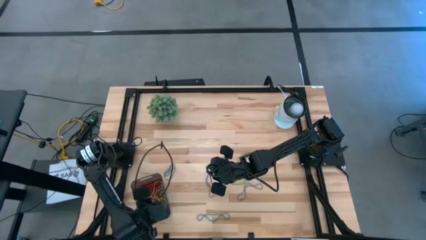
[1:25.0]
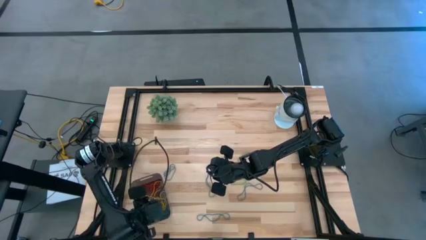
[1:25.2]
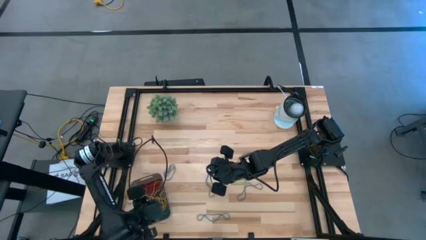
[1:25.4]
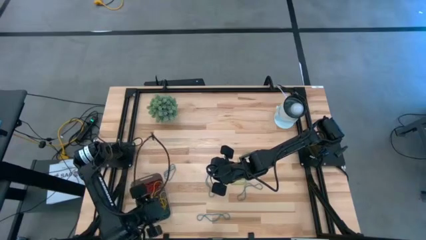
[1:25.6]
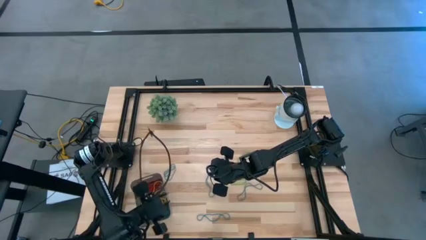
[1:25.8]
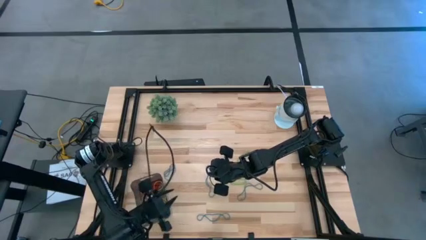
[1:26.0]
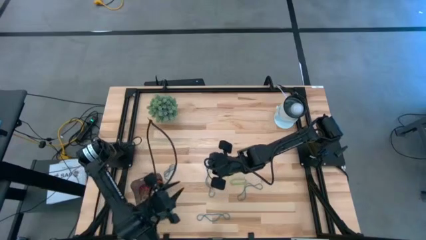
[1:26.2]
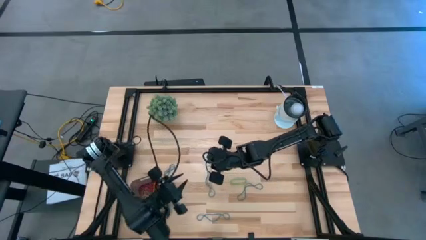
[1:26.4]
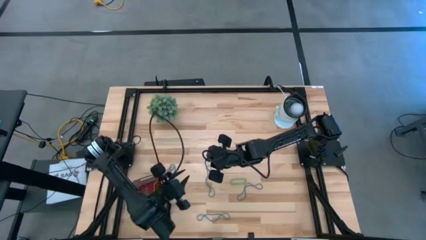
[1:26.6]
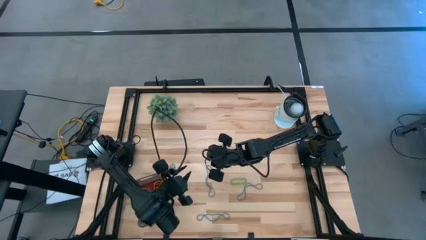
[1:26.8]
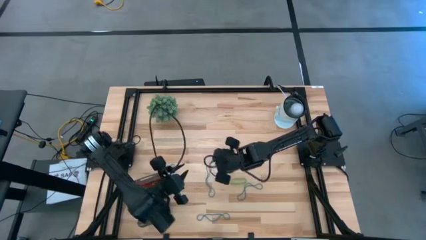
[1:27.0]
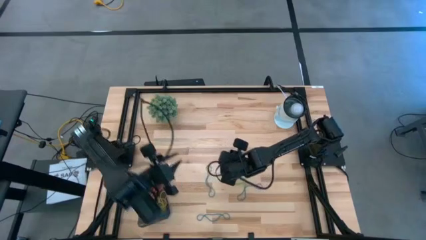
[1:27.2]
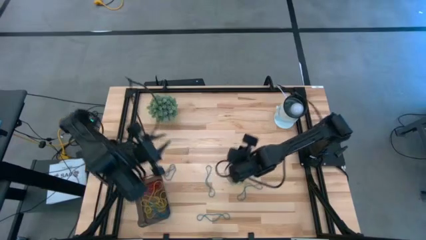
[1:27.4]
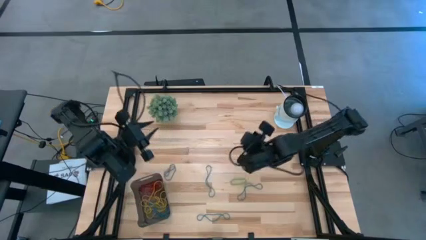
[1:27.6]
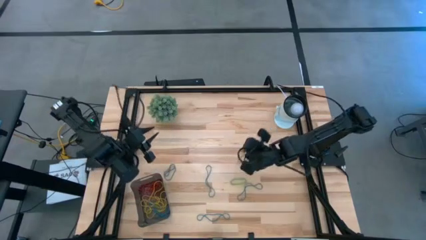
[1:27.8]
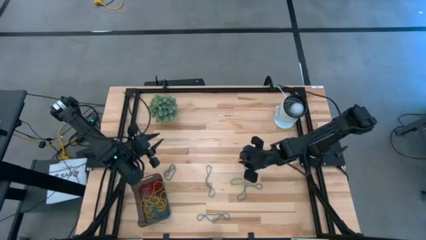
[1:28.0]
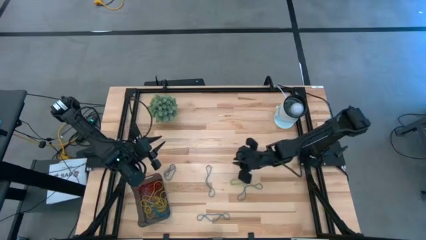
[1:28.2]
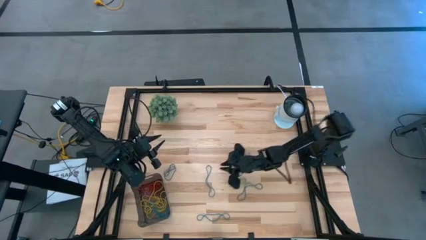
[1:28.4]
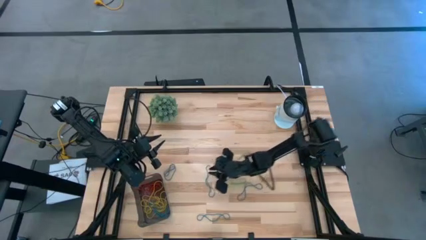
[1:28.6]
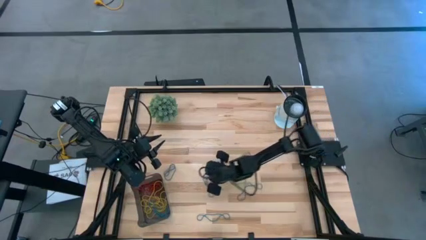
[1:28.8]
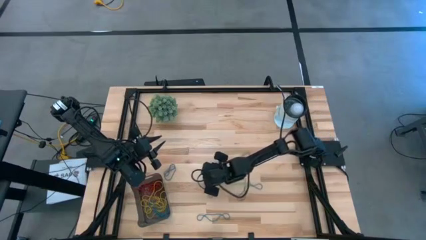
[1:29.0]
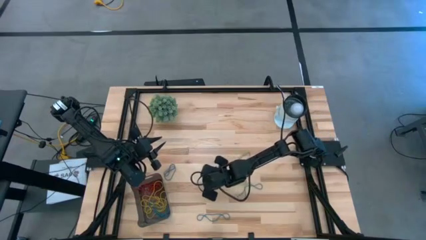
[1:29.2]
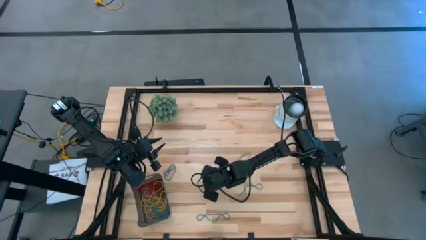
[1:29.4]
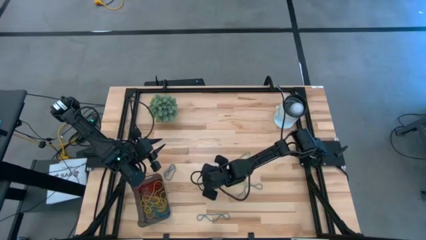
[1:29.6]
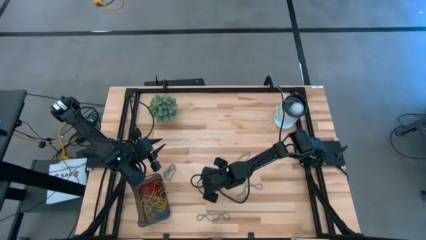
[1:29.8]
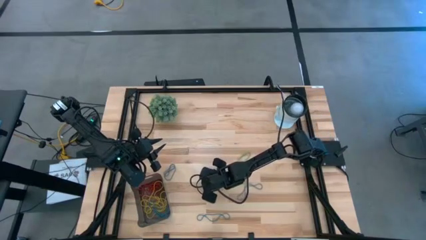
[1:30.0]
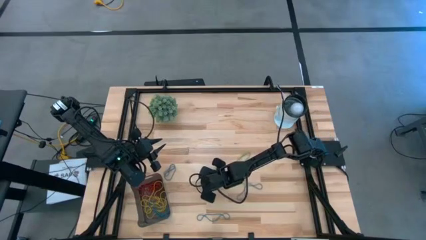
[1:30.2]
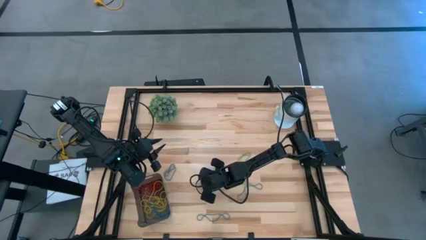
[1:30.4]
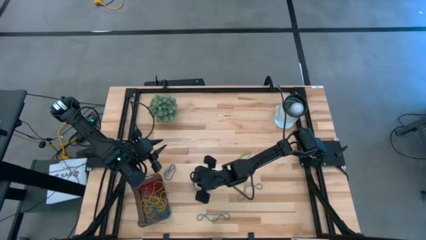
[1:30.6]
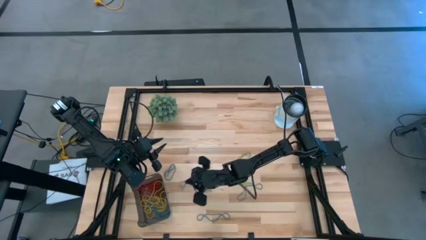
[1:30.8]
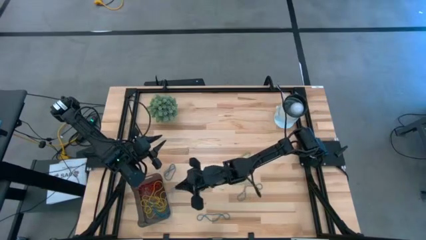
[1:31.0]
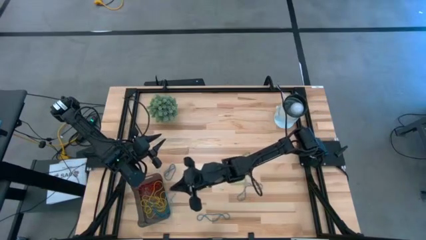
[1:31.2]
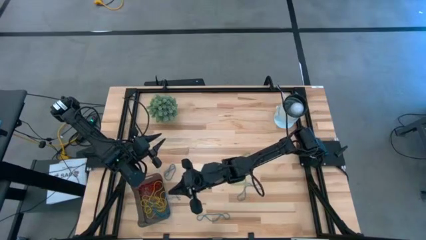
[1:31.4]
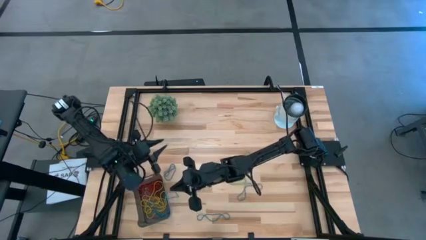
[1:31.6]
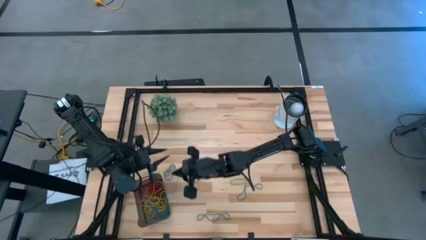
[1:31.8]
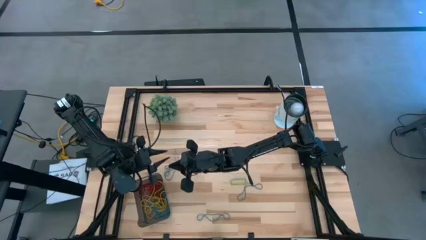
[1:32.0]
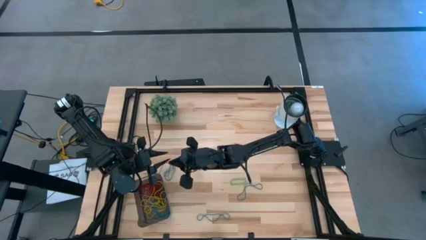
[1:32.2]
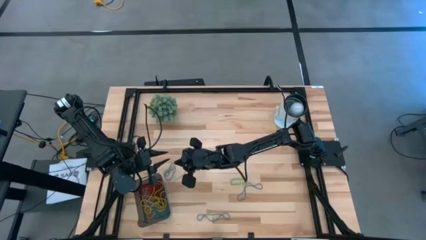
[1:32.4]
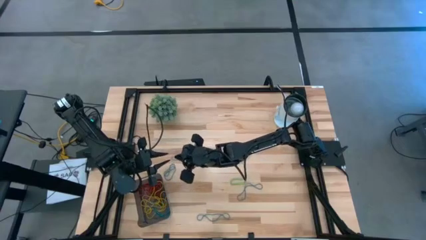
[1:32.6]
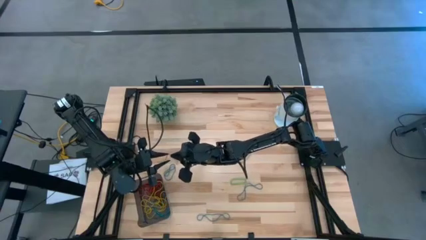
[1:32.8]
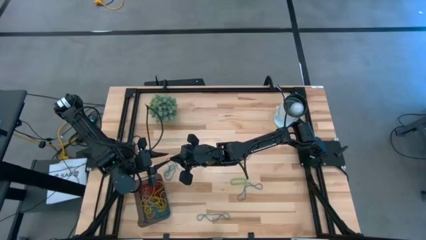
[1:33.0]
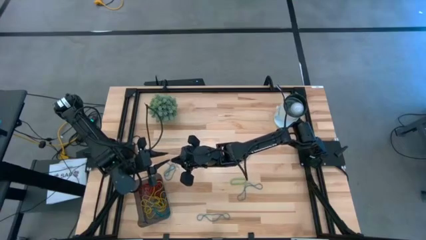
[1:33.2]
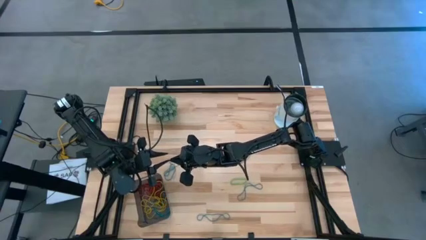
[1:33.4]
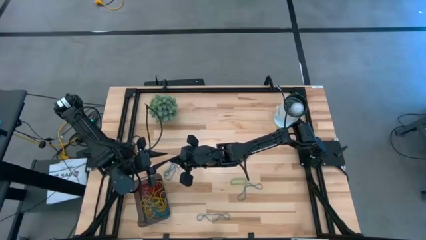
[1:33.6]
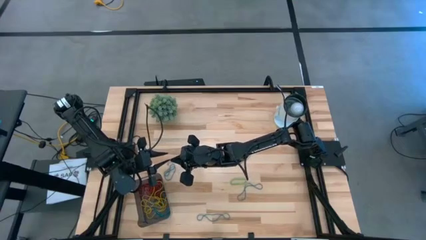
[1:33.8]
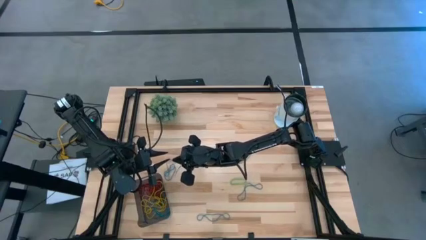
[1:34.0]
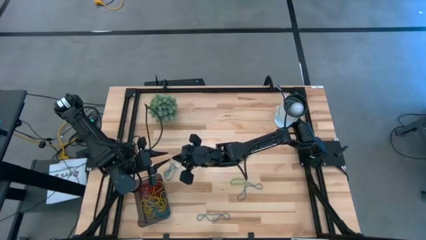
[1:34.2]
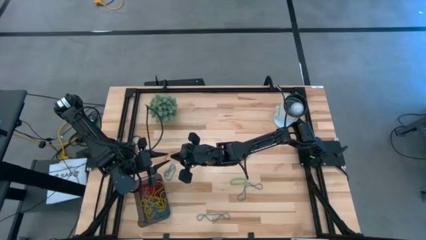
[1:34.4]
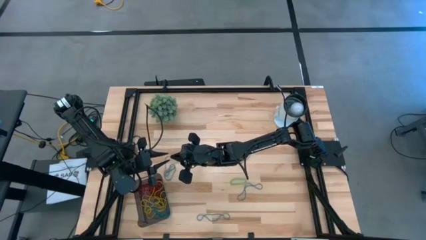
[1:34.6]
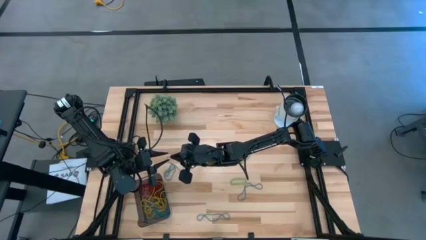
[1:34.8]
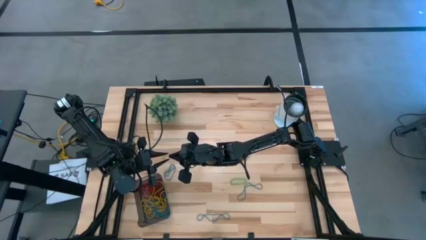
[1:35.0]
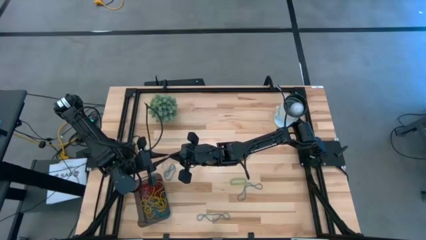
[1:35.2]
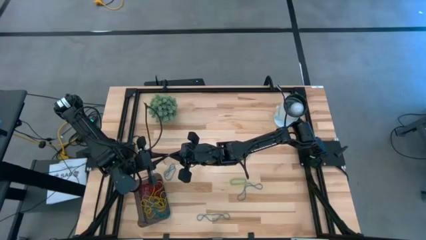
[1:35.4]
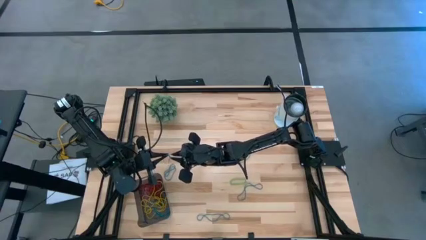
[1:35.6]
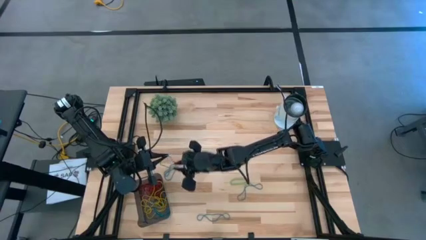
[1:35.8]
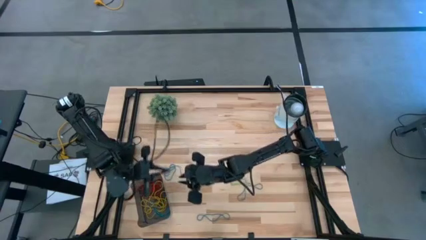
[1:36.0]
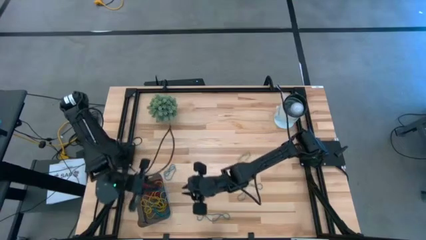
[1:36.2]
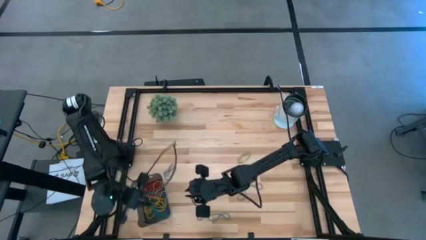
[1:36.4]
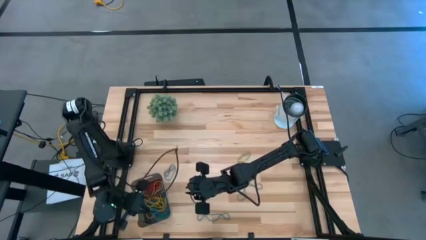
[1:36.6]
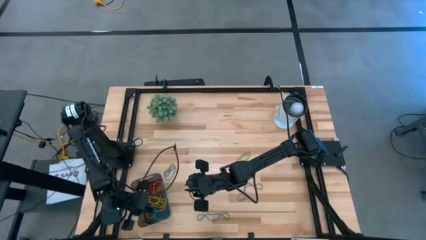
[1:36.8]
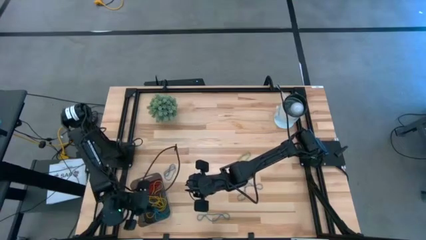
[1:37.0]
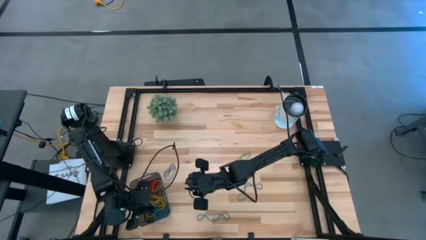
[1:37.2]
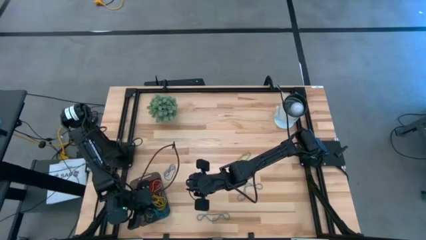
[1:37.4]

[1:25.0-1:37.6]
Task: Pick and place items into bin
Put the blue rubber band into the black bin
